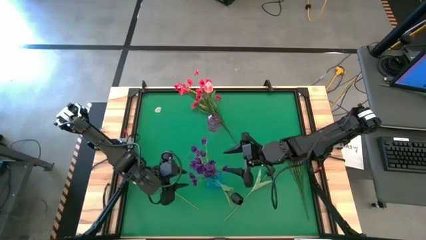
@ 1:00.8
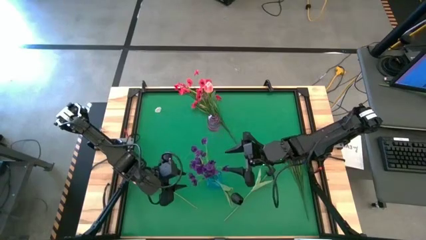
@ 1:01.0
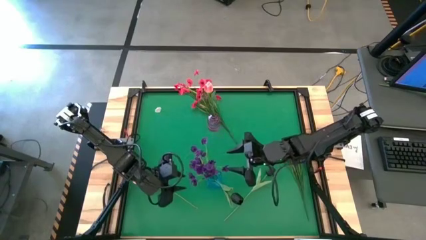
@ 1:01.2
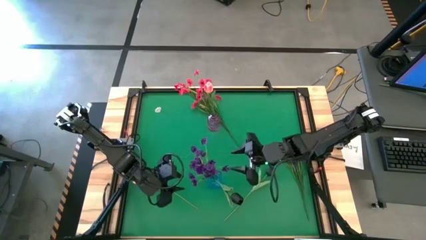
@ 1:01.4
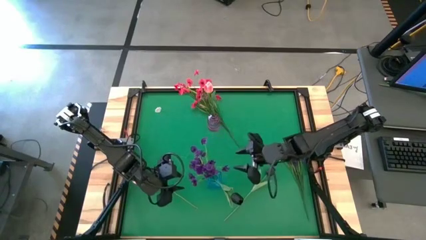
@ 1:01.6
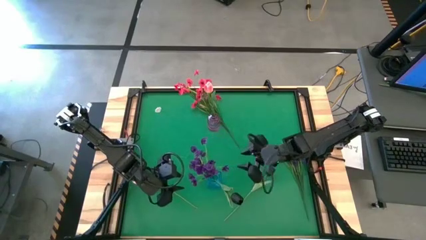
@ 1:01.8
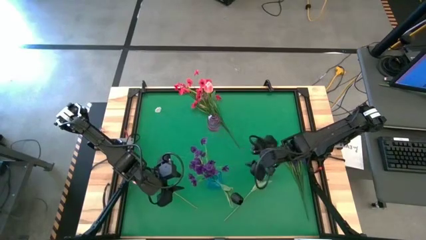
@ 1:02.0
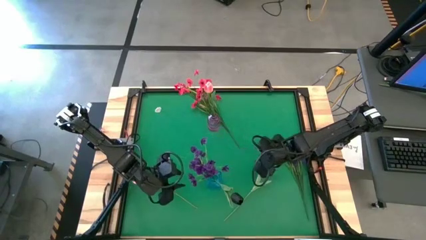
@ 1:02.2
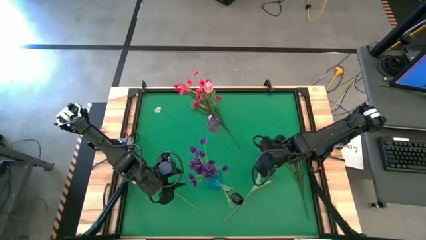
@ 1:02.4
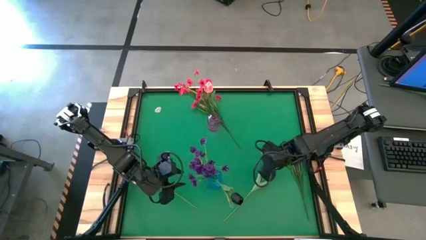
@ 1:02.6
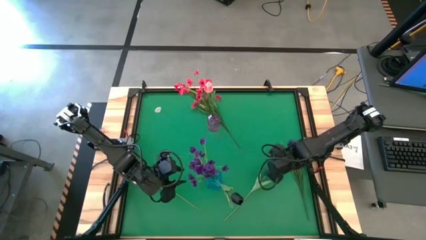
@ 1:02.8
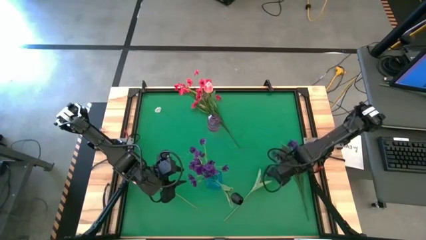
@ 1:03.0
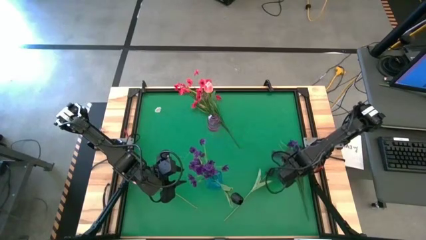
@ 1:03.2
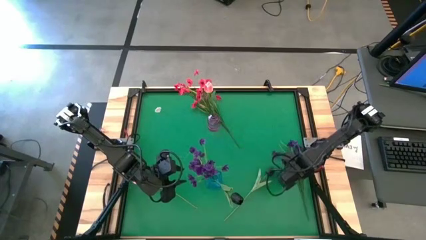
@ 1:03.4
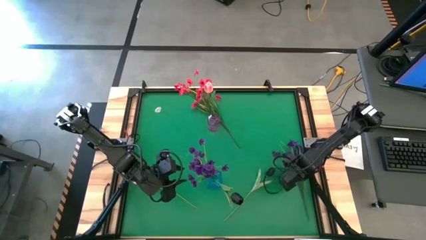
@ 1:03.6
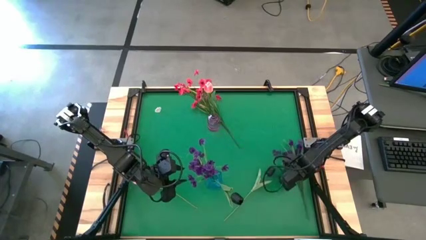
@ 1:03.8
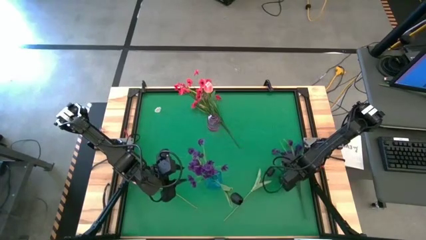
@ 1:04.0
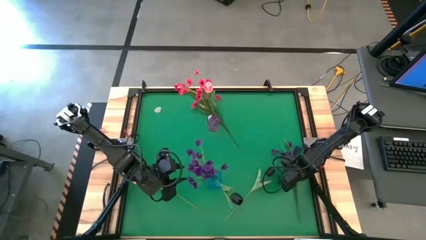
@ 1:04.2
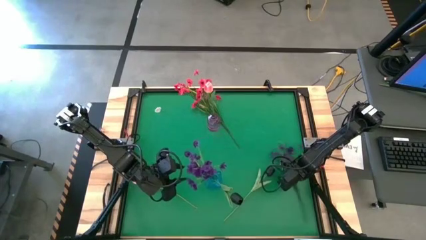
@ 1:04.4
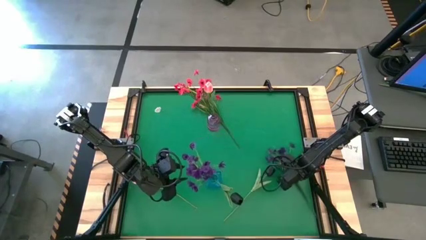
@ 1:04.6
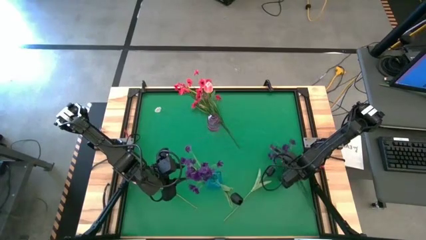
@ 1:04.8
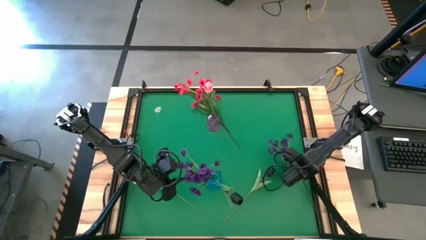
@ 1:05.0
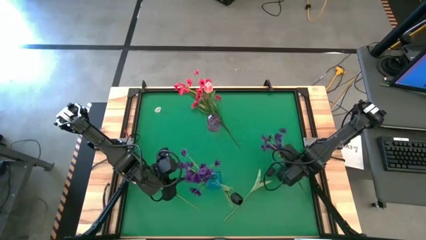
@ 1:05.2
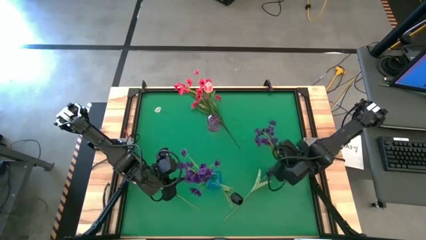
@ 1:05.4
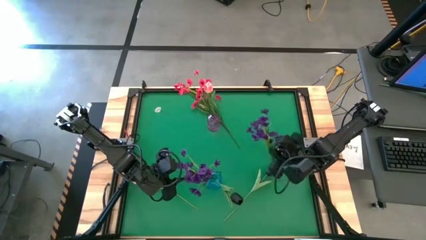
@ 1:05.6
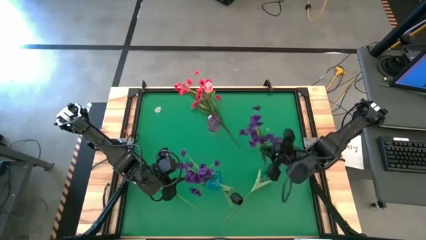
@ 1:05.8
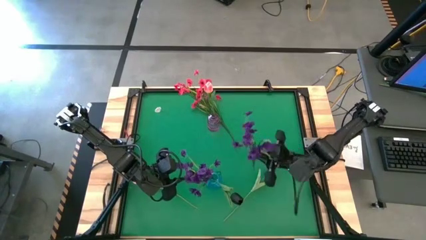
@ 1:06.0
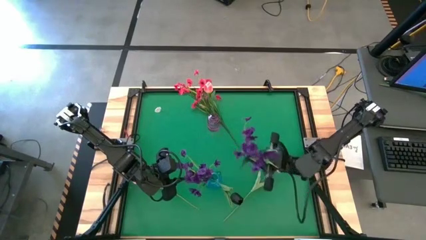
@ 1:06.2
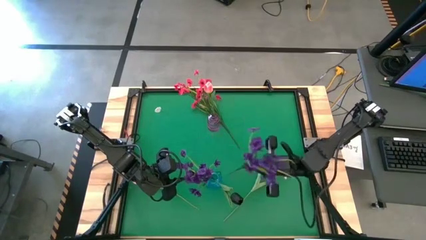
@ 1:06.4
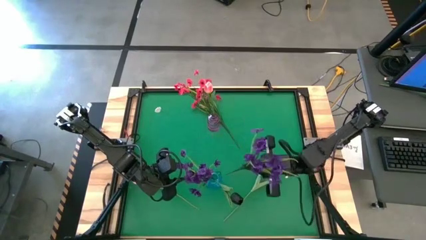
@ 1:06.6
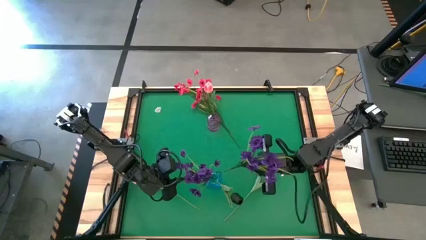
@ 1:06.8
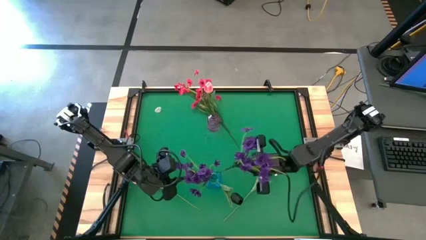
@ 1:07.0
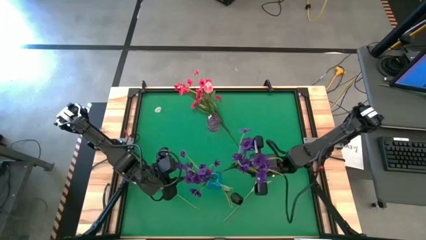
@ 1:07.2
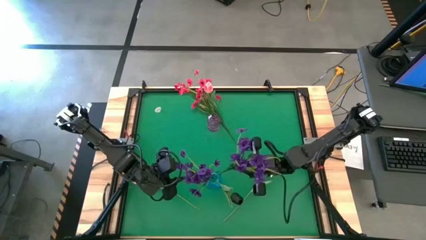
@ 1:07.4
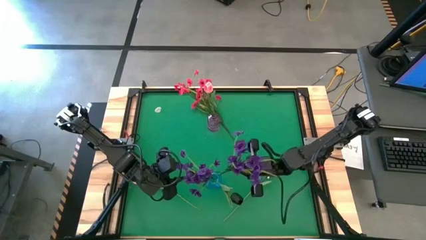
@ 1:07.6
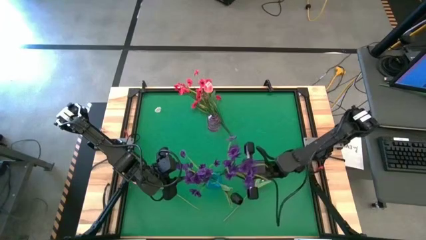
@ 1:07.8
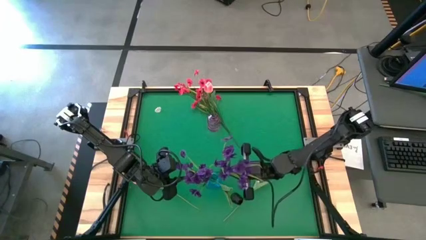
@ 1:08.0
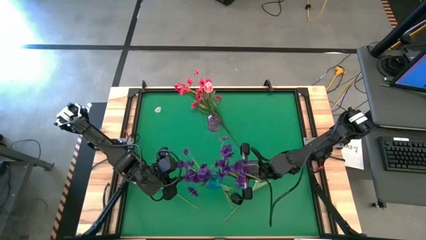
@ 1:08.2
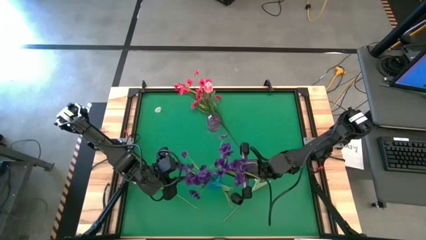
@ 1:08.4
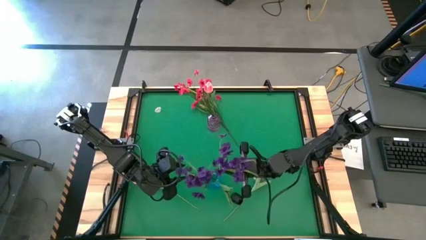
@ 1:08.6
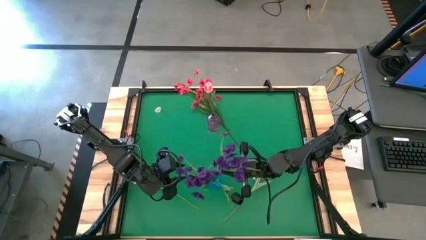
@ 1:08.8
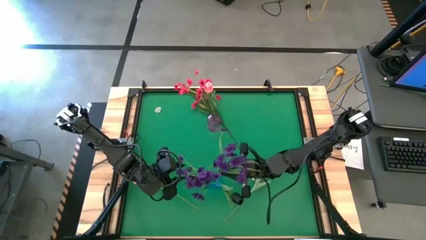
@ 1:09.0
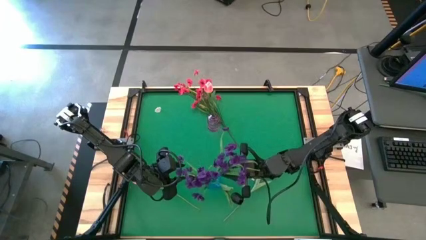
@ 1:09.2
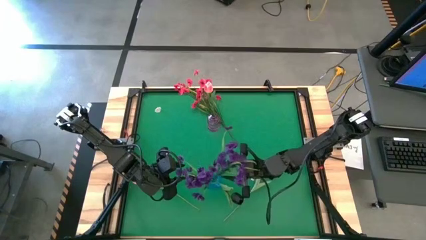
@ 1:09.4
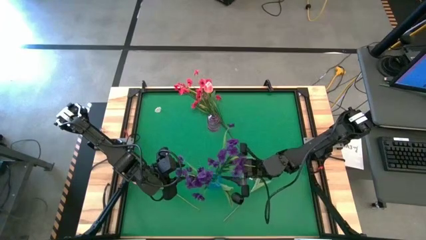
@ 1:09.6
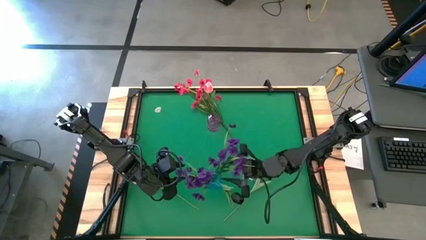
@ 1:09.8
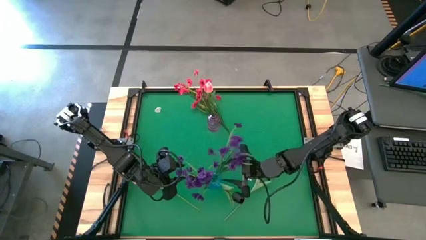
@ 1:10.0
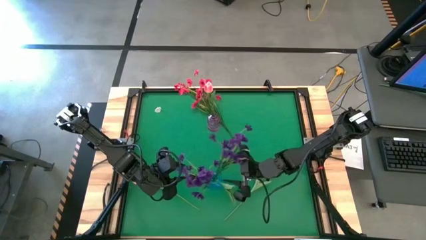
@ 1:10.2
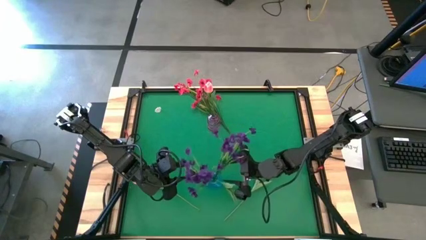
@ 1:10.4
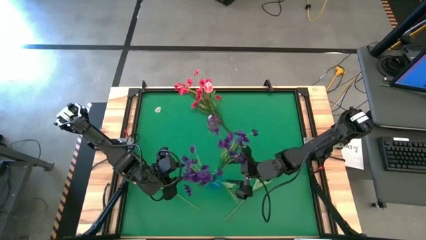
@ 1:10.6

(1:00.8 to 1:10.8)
Task: Sort flowers into vase by color
Put the purple flowers into the blue vase

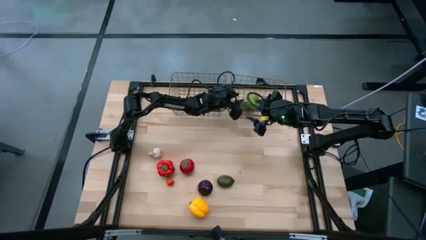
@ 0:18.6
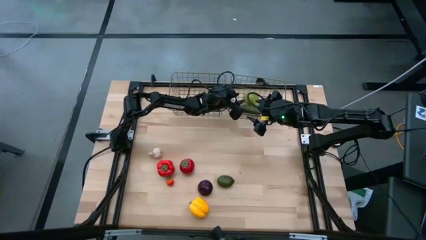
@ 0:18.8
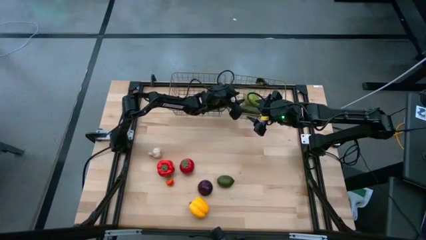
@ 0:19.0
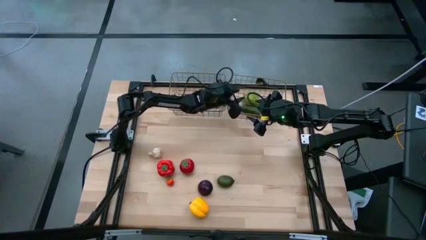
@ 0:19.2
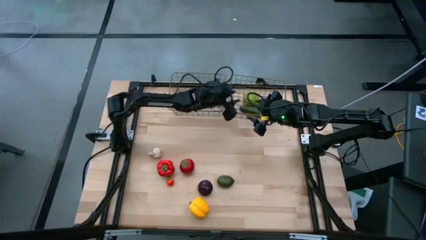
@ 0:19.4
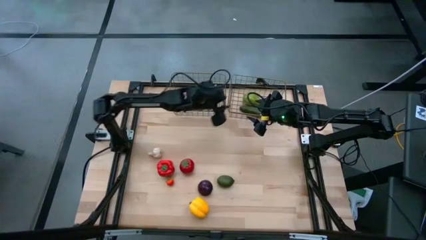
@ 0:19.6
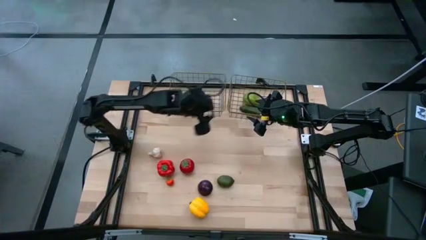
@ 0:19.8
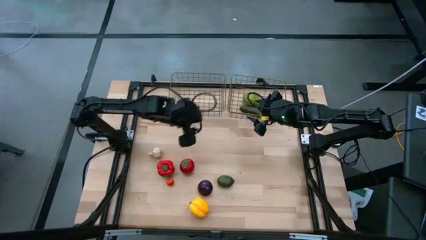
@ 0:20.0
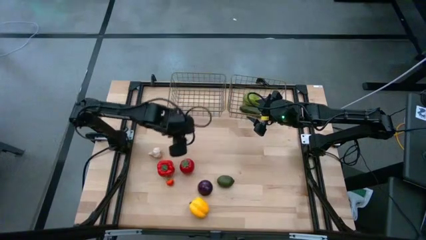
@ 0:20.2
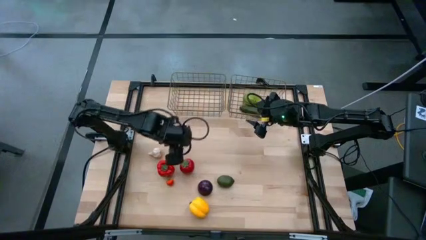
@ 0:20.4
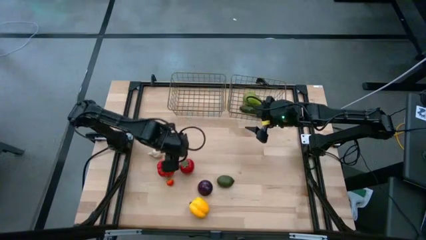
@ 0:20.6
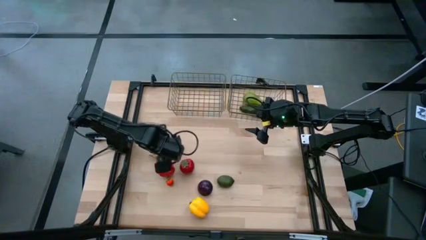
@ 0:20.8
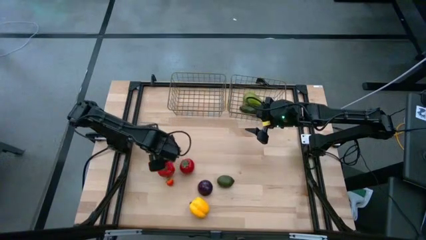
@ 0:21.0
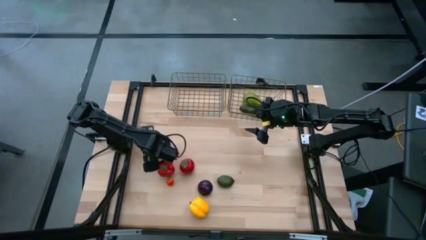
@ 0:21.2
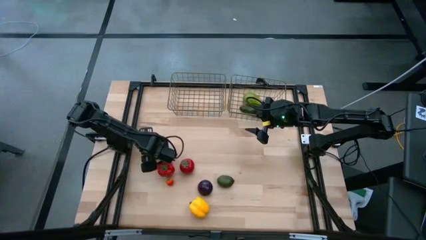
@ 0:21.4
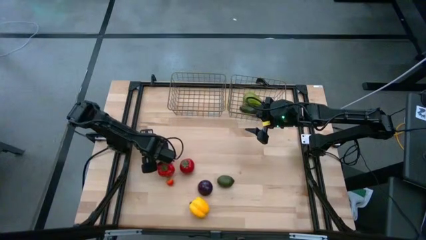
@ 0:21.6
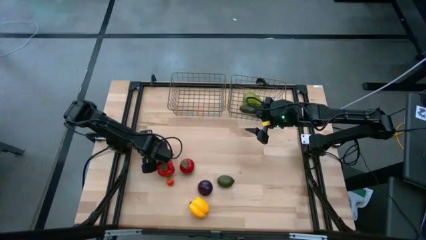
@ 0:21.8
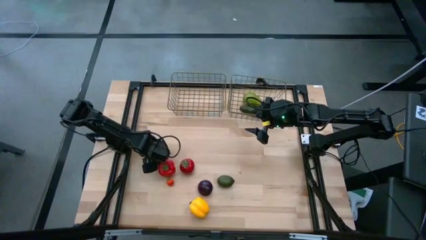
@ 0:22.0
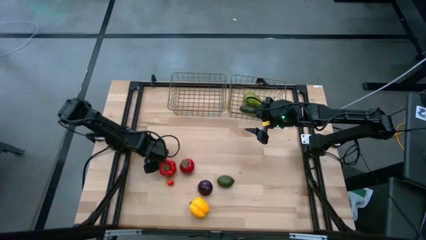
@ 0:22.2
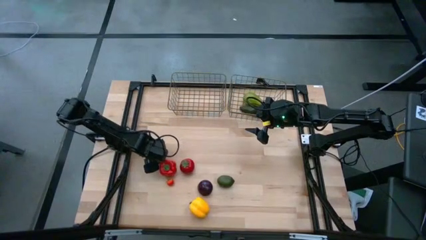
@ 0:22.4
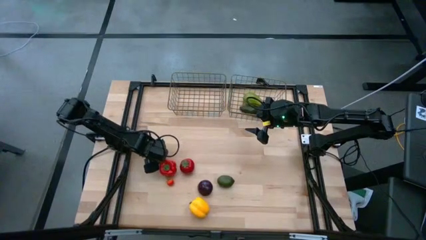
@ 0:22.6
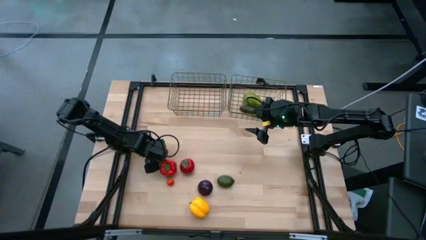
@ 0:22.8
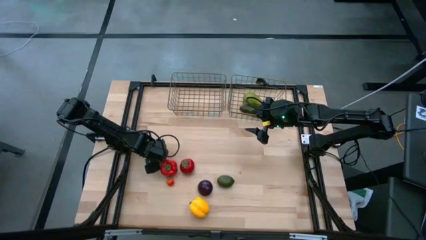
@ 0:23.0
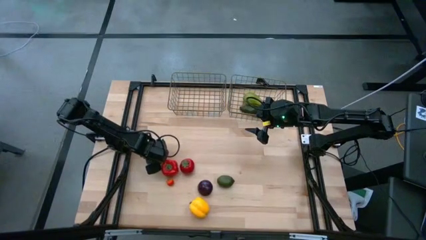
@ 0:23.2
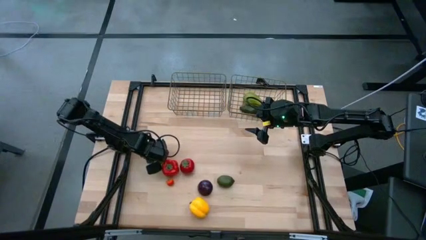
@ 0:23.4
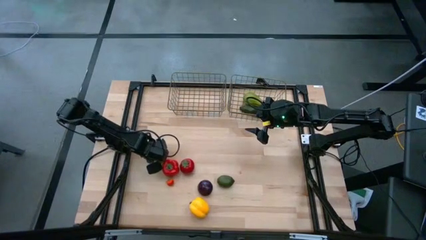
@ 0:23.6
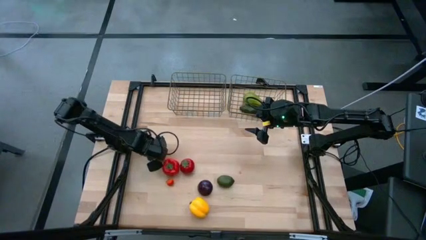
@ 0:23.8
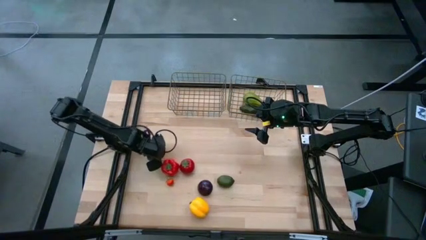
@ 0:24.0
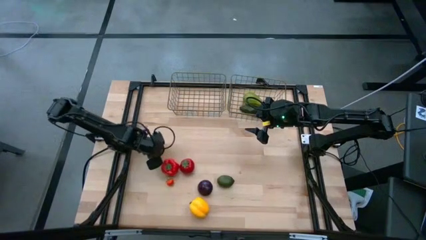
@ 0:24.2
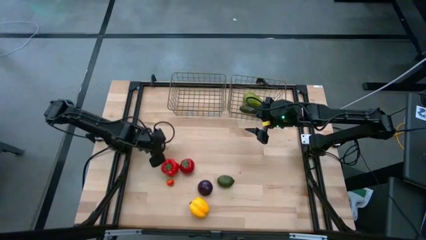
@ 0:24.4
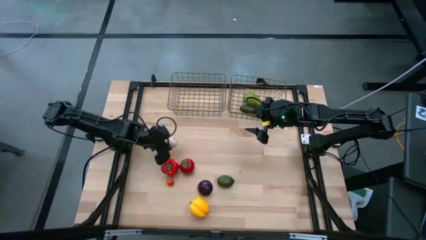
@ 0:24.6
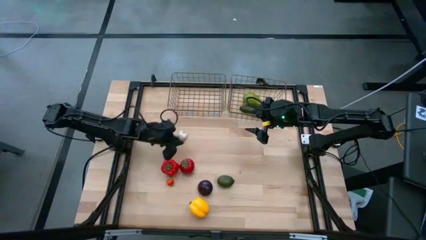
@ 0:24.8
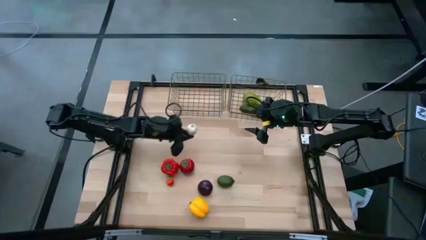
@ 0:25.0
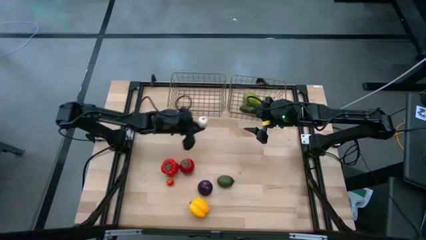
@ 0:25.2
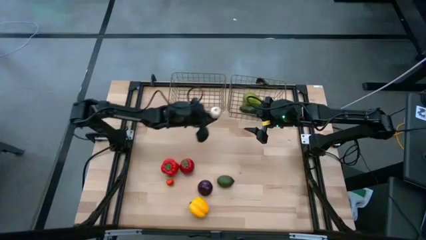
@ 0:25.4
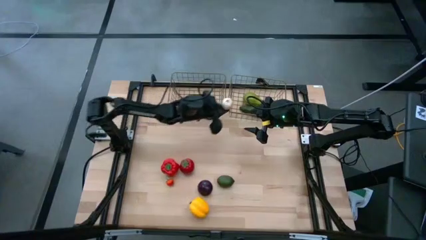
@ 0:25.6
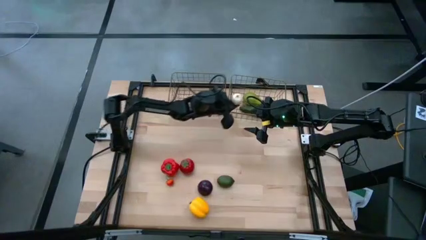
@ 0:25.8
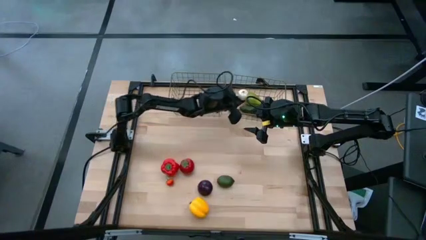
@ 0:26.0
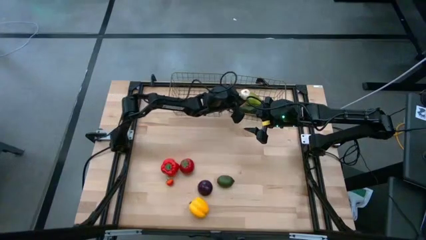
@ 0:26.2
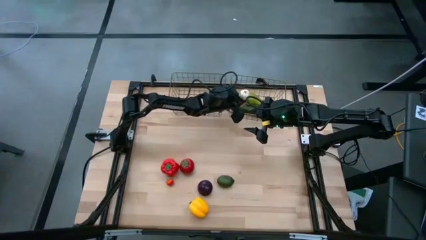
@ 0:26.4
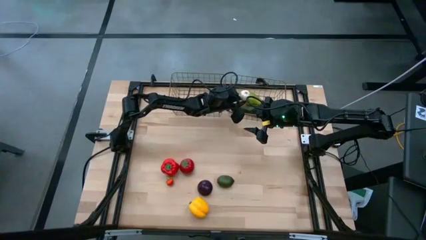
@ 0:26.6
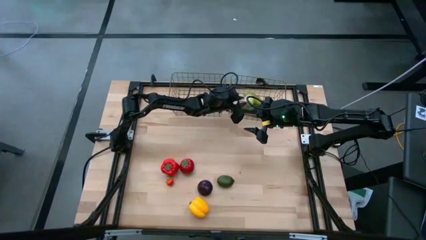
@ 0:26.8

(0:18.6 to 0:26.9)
Task: Sort produce into baskets
Put the white garlic into the right gold wire basket
